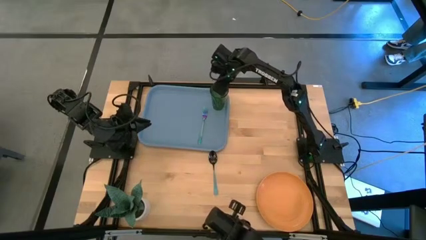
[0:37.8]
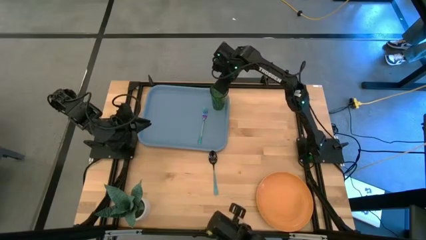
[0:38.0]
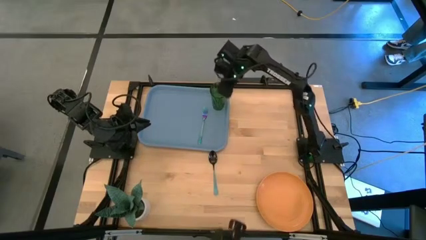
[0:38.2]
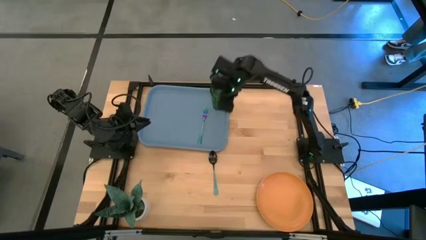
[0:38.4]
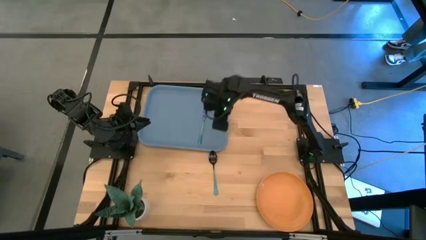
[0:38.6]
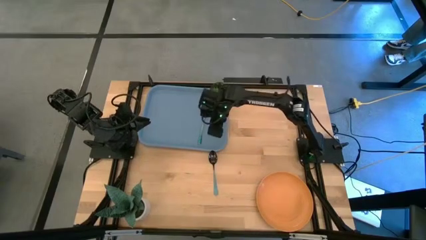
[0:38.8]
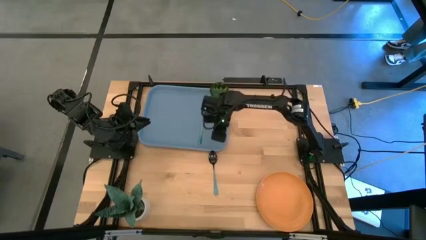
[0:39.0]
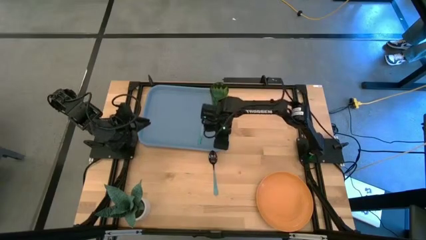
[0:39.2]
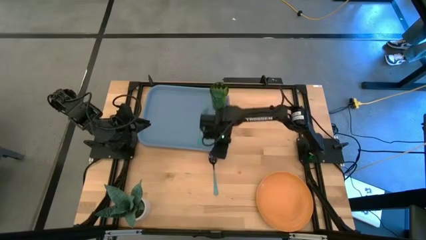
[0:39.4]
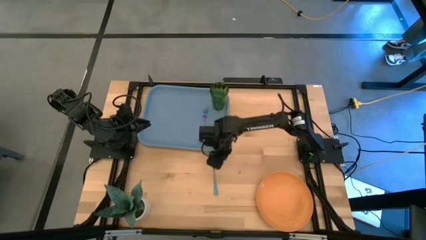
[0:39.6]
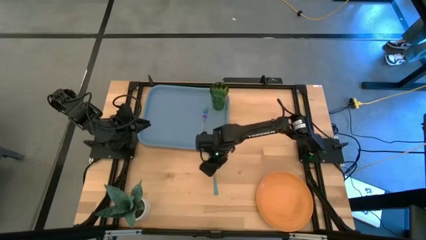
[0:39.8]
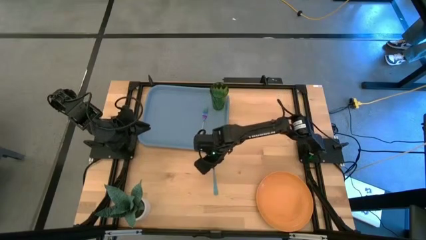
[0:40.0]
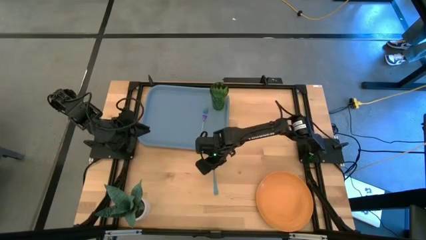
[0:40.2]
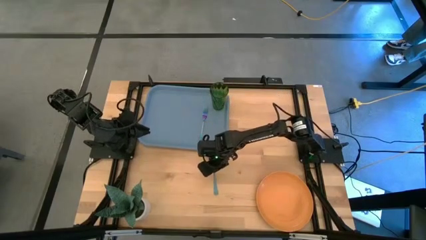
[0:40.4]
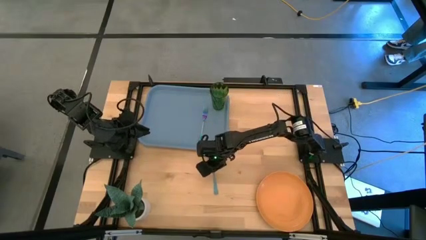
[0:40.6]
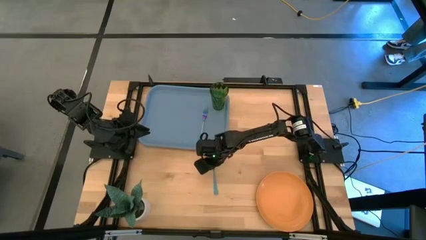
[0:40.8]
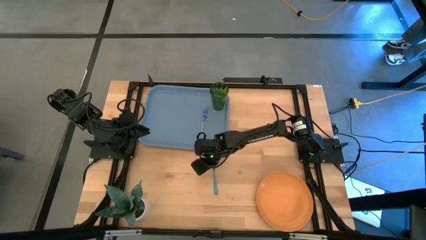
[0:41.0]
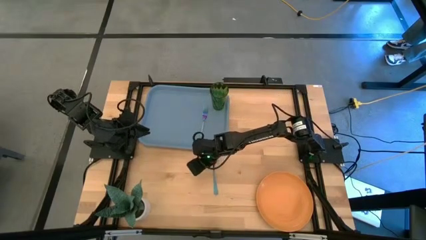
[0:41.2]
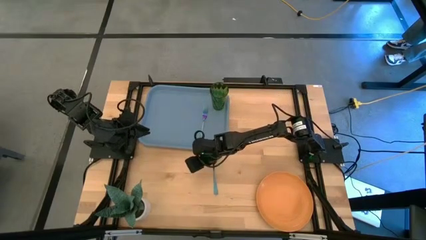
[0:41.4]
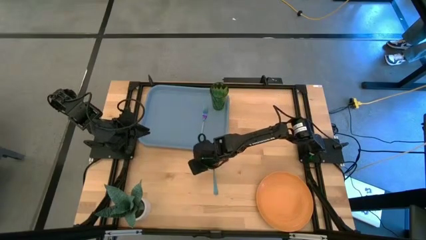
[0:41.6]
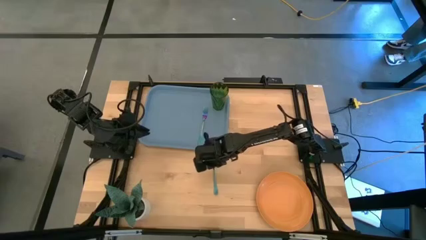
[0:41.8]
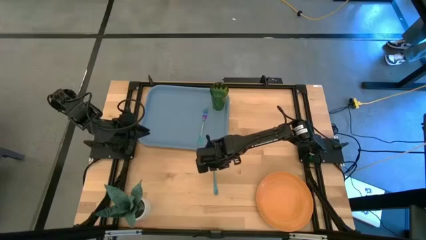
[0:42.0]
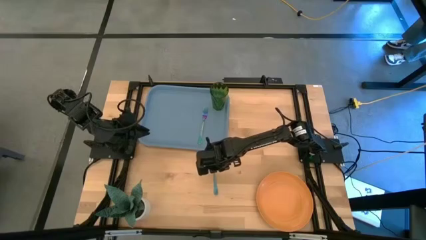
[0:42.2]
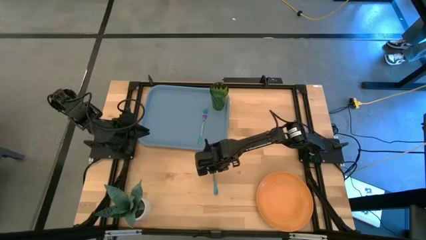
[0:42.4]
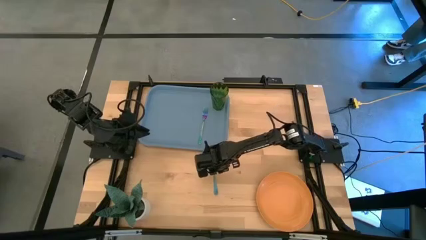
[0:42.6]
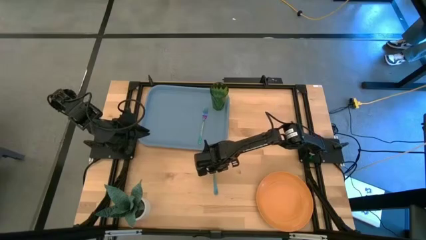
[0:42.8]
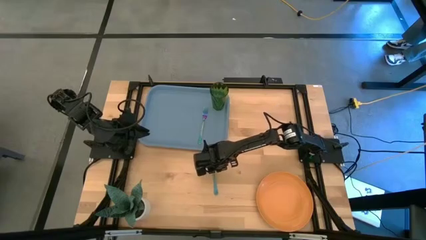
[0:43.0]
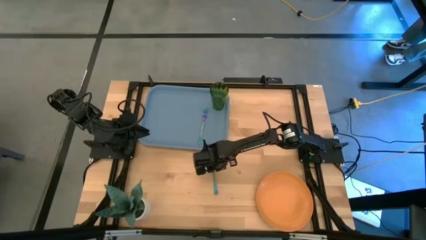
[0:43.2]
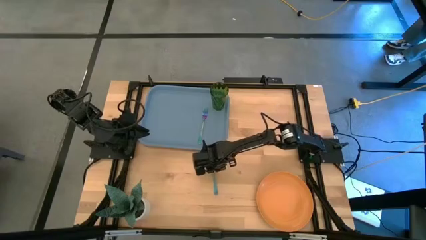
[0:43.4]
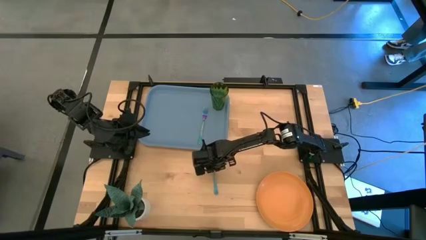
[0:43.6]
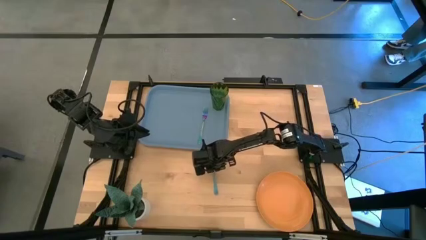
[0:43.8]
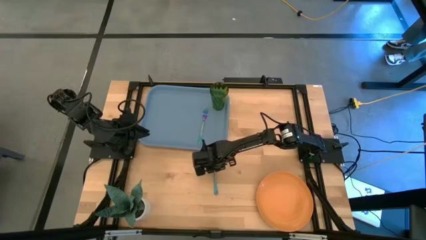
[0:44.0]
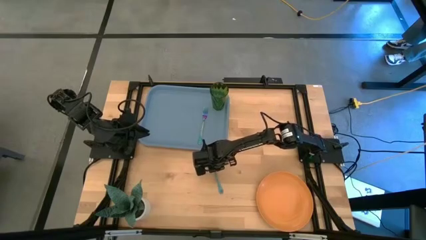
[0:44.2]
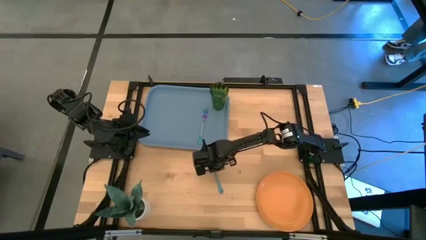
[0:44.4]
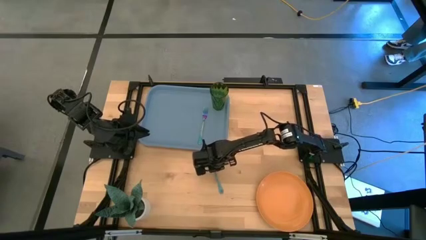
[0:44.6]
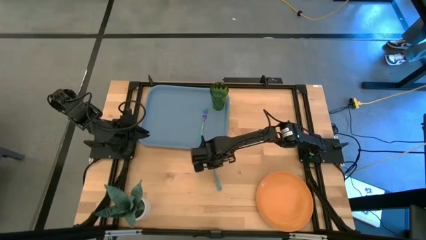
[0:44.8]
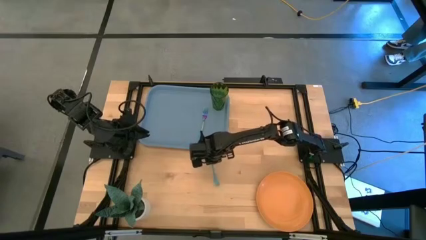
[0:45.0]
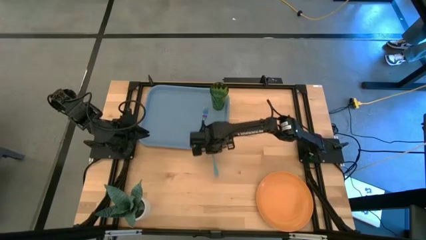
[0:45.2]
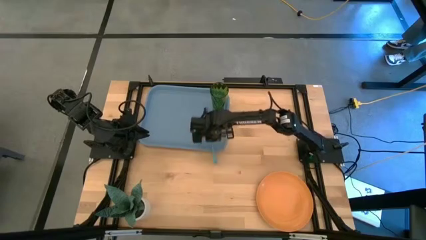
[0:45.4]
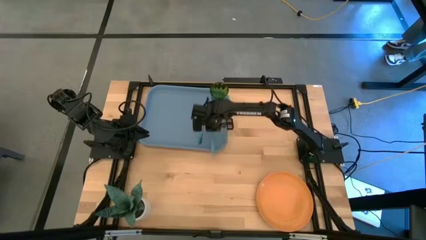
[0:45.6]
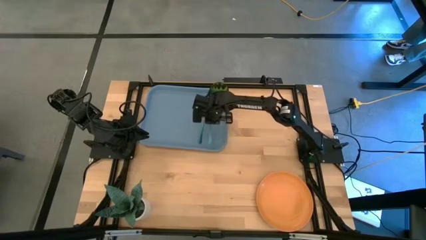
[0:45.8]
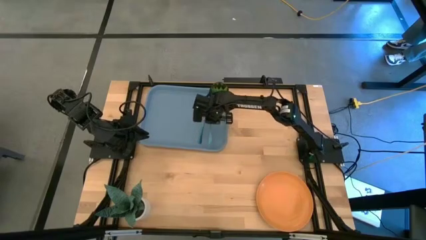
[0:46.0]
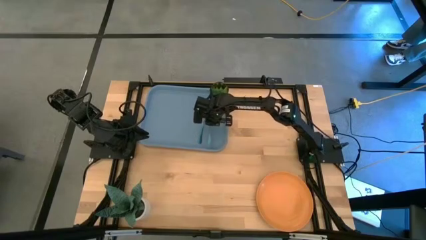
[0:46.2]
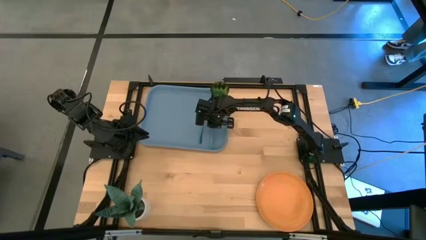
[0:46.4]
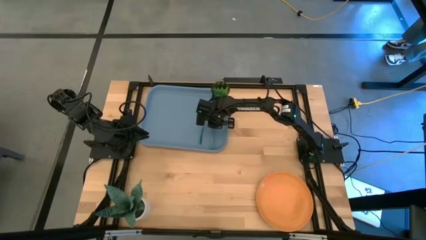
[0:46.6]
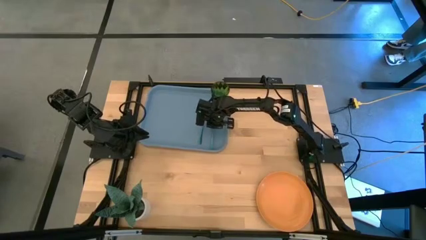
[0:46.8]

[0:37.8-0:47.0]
Task: Pick and place plate/cup/fork/spoon on tray
Put the blue spoon on the blue tray to the right of the blue fork
